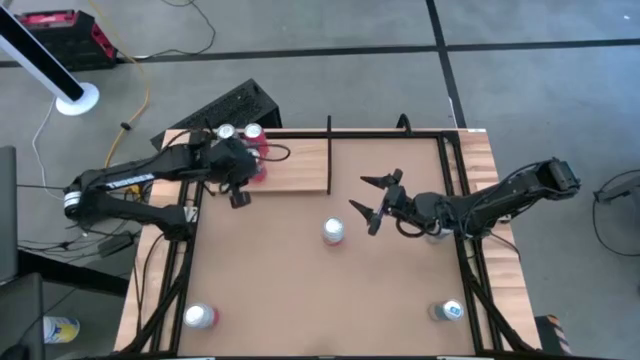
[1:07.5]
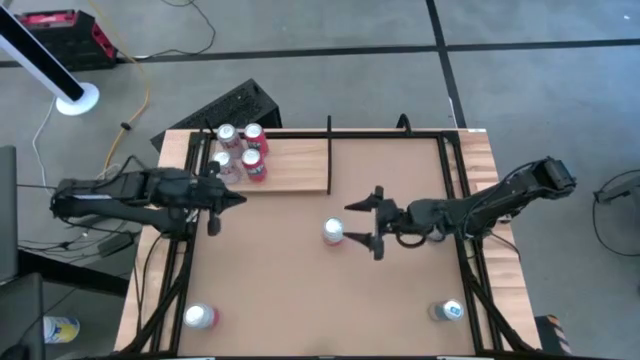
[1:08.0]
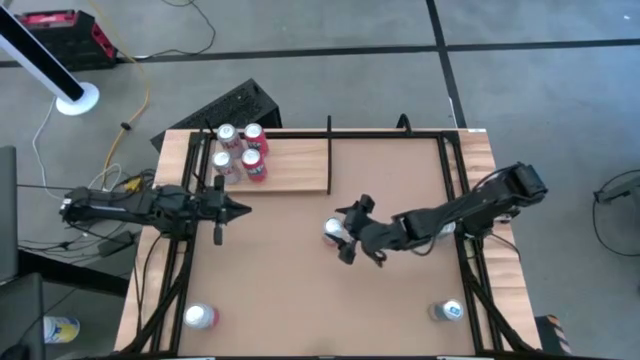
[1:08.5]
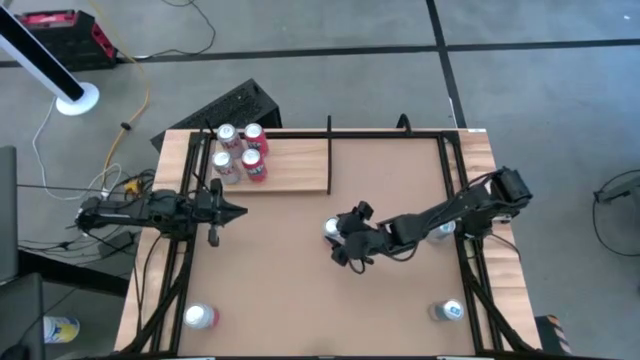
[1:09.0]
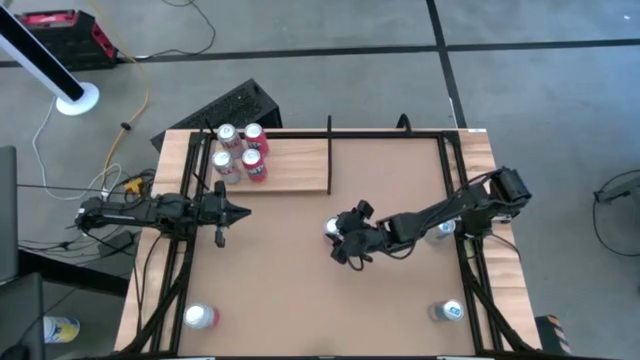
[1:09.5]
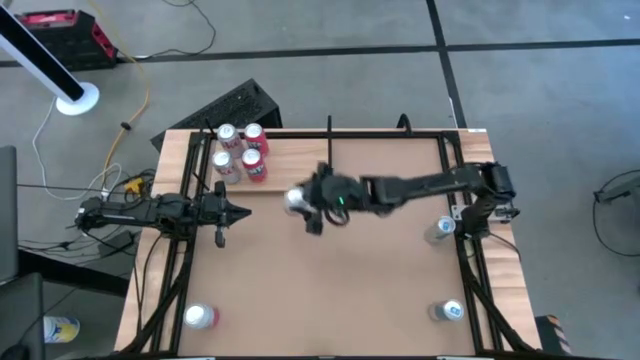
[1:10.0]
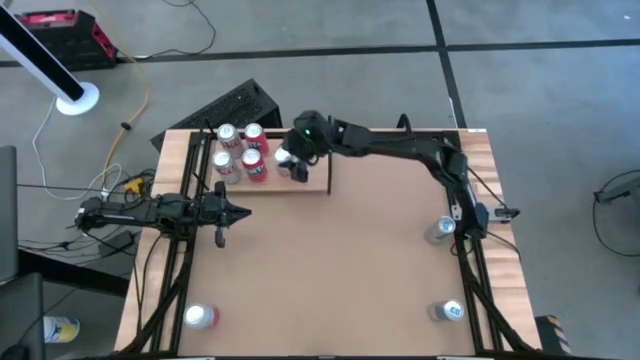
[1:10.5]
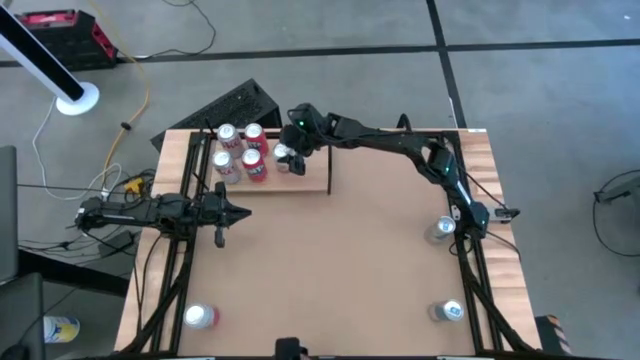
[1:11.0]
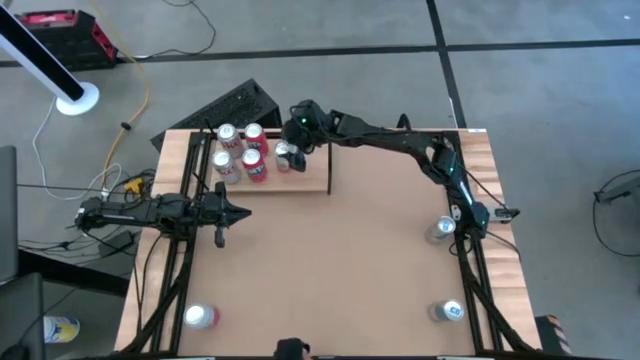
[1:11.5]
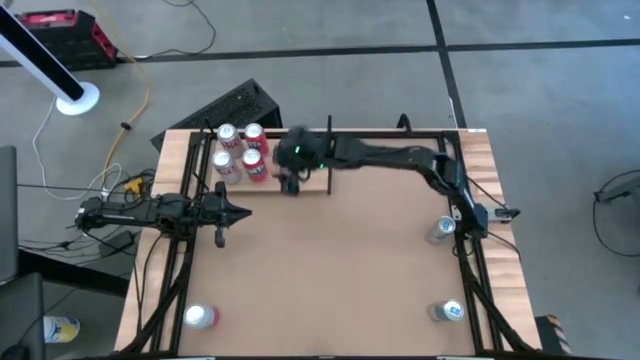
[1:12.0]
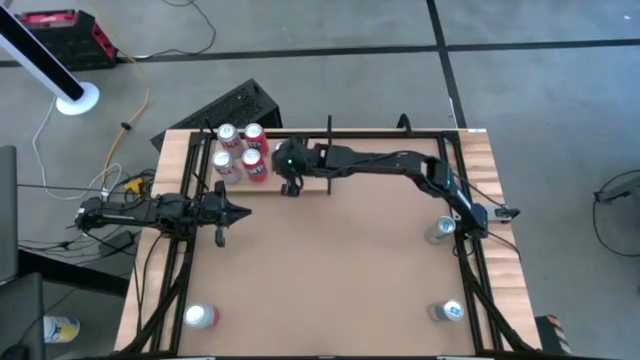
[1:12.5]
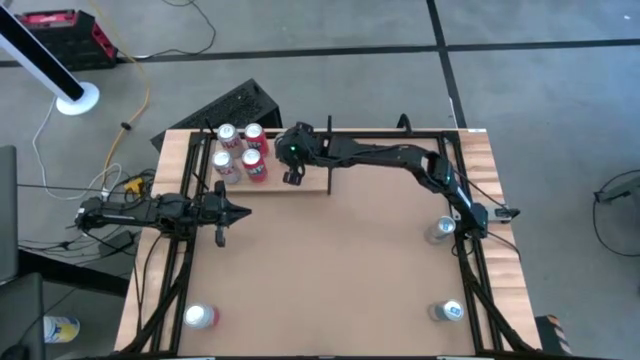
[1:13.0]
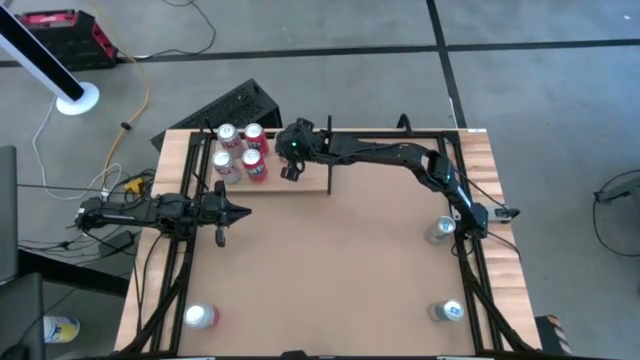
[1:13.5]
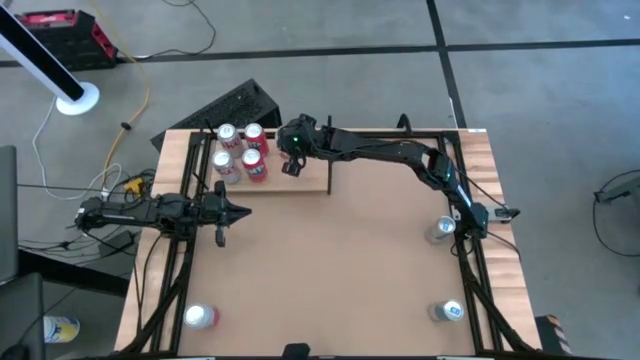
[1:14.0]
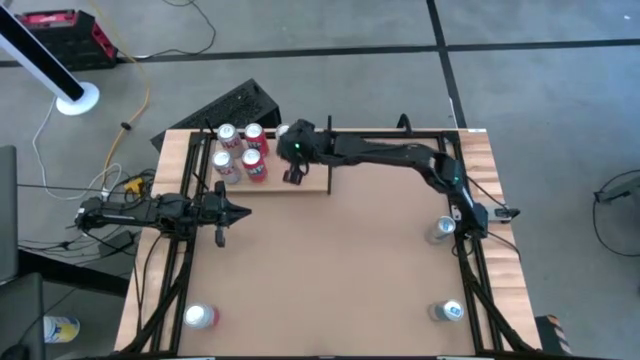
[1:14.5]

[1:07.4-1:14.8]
Task: Place canned beverage on shelf
Put the center pink and white soda can on the shelf

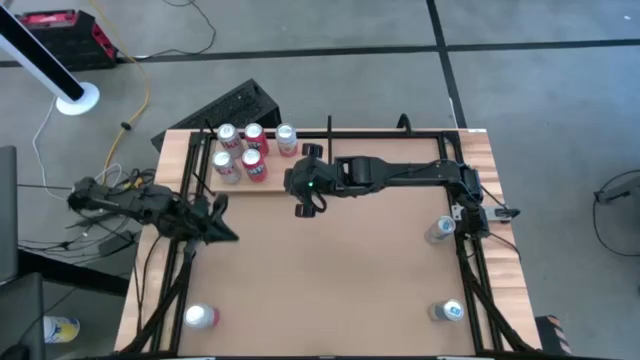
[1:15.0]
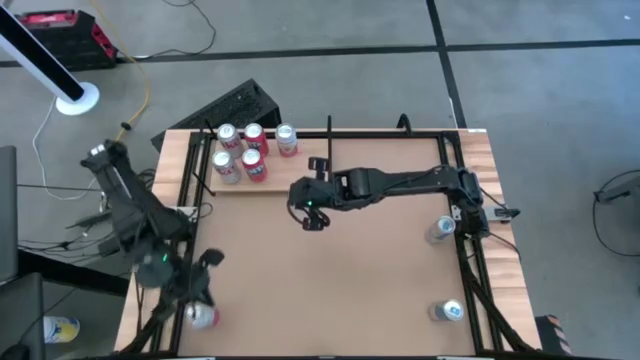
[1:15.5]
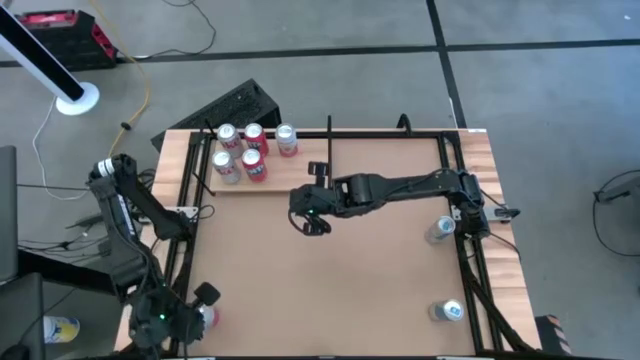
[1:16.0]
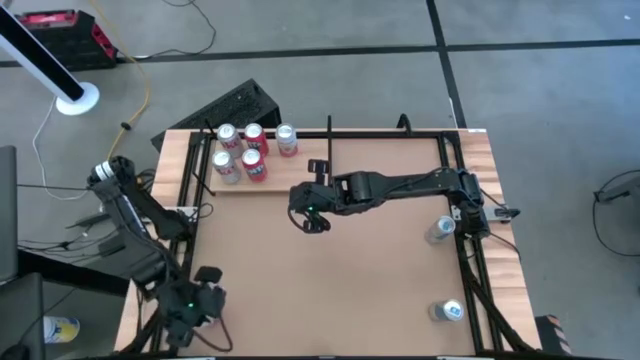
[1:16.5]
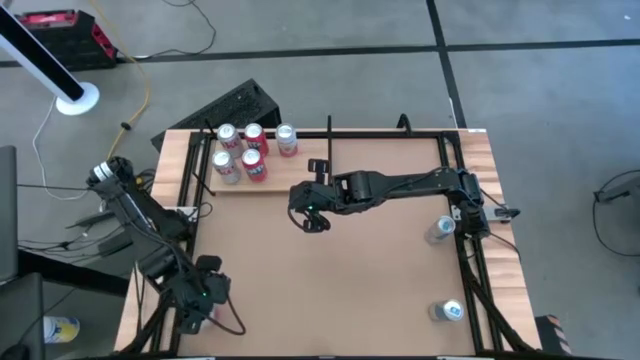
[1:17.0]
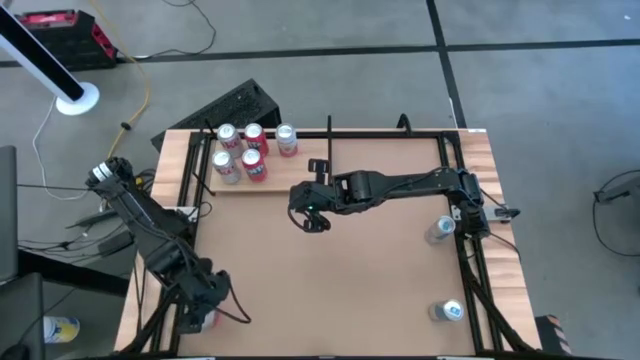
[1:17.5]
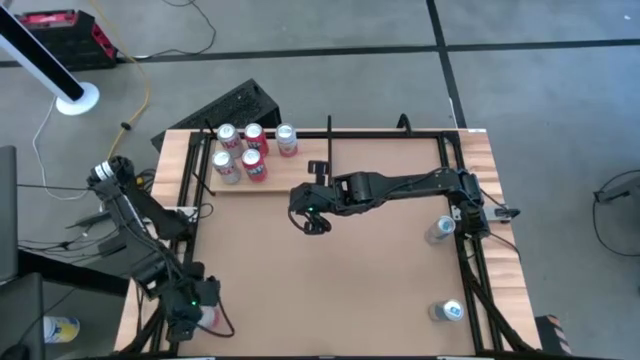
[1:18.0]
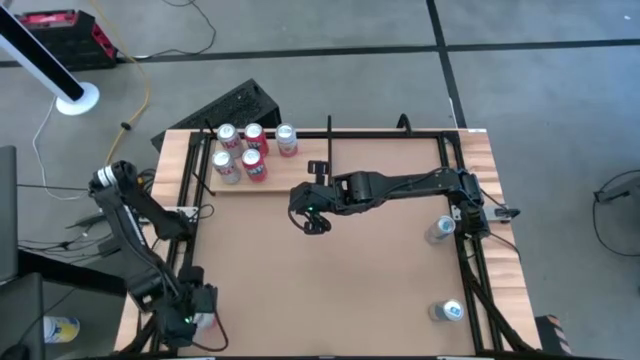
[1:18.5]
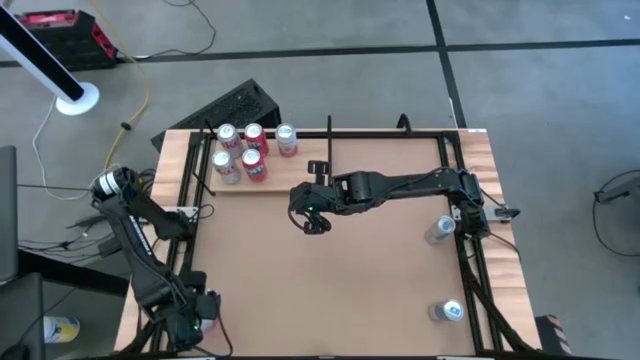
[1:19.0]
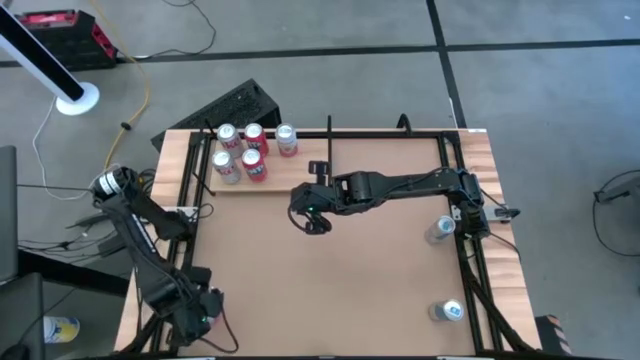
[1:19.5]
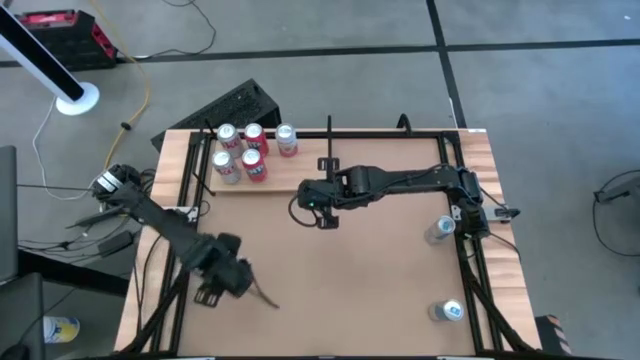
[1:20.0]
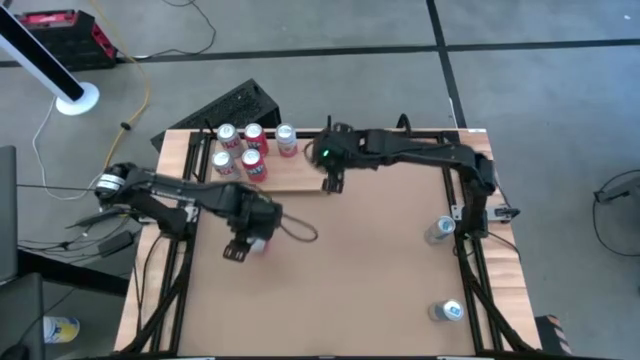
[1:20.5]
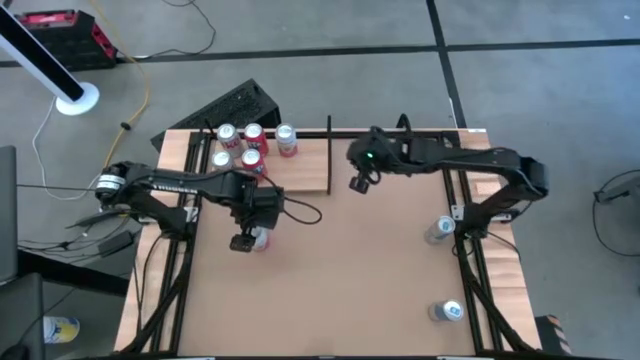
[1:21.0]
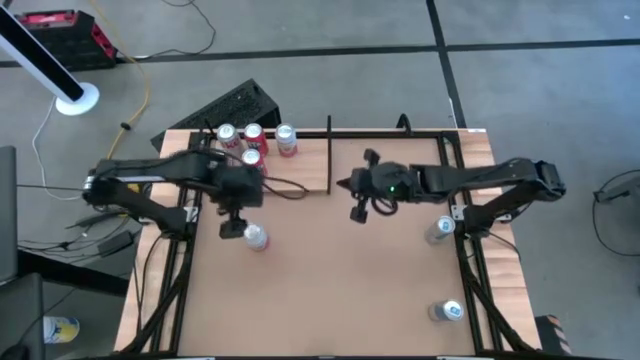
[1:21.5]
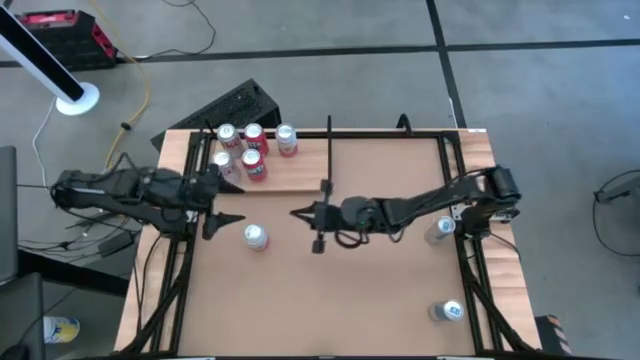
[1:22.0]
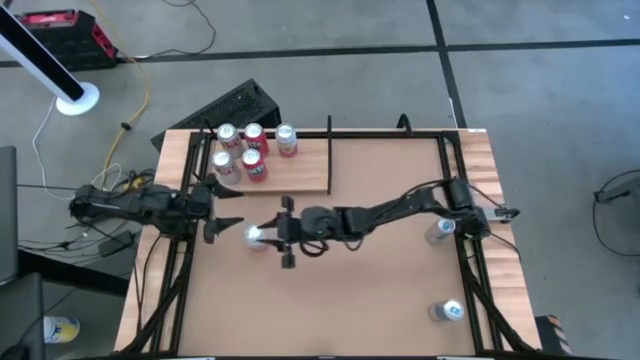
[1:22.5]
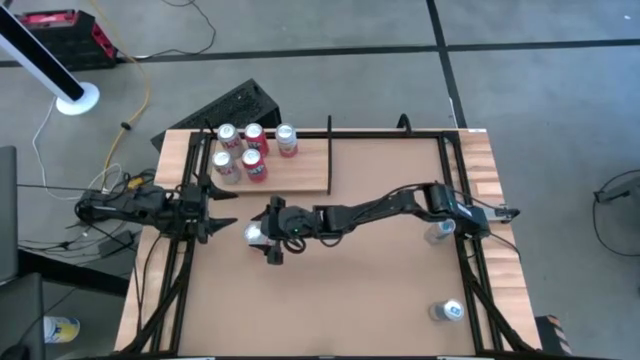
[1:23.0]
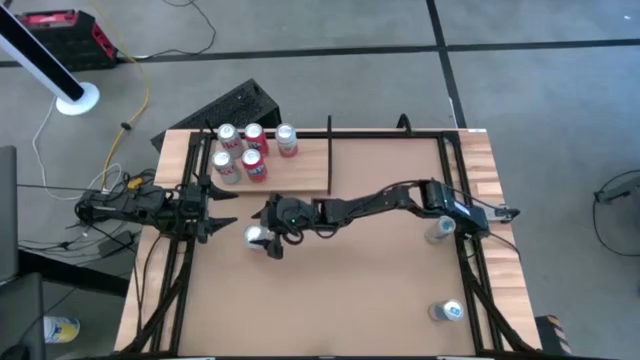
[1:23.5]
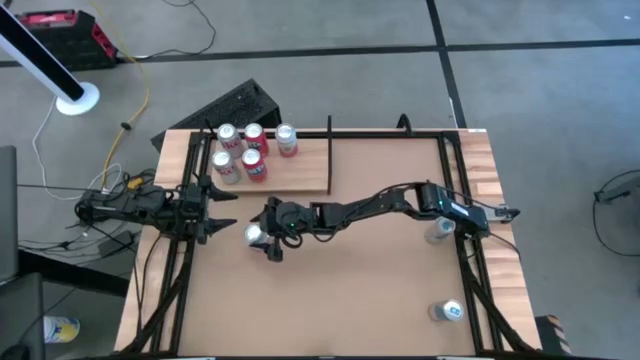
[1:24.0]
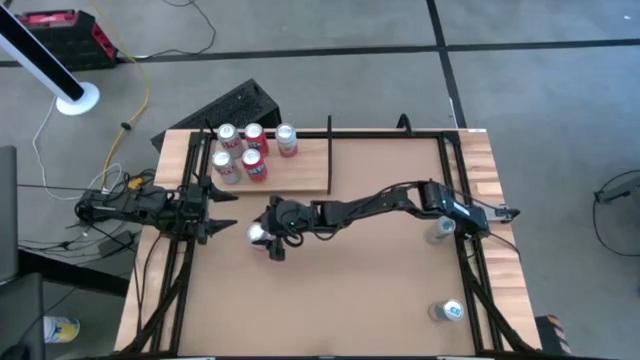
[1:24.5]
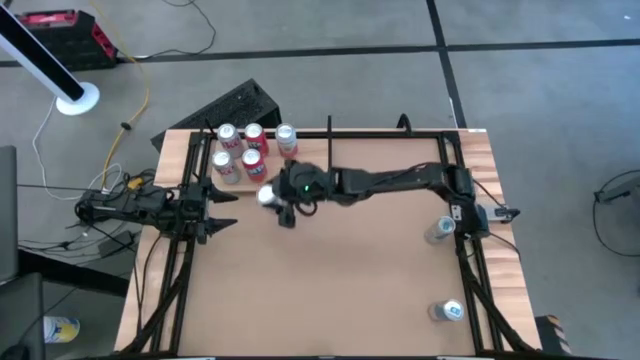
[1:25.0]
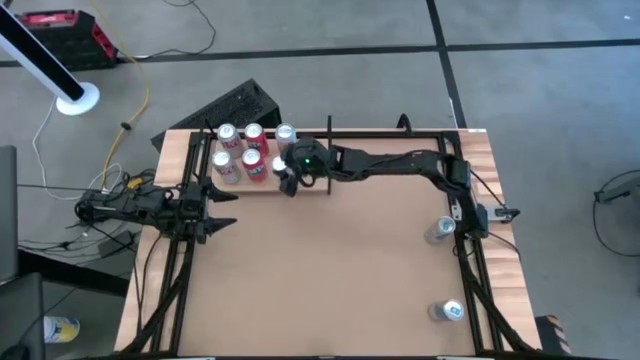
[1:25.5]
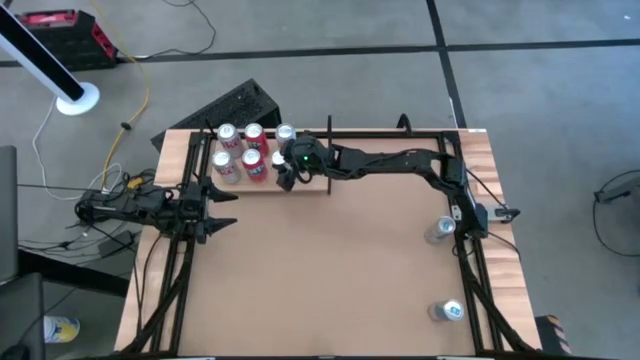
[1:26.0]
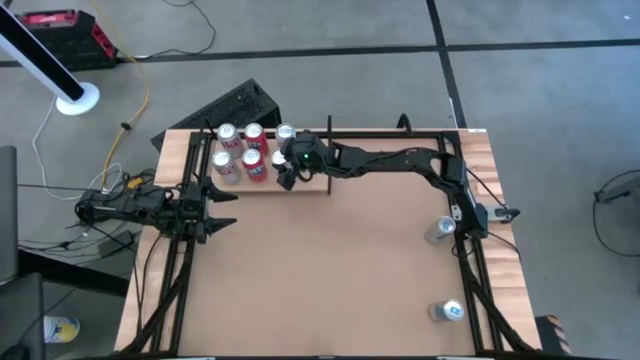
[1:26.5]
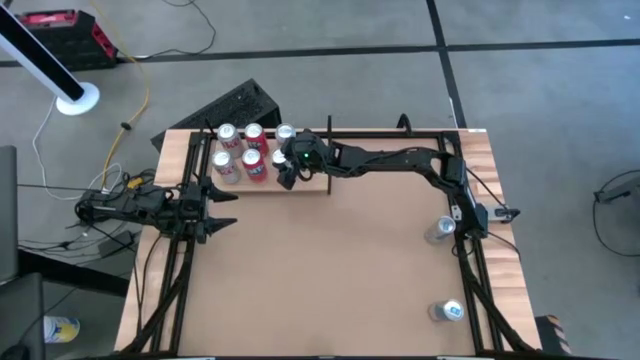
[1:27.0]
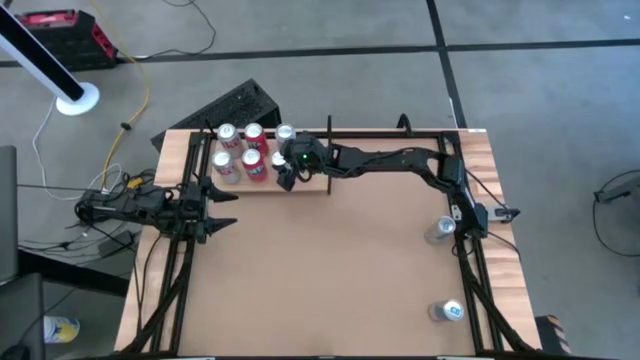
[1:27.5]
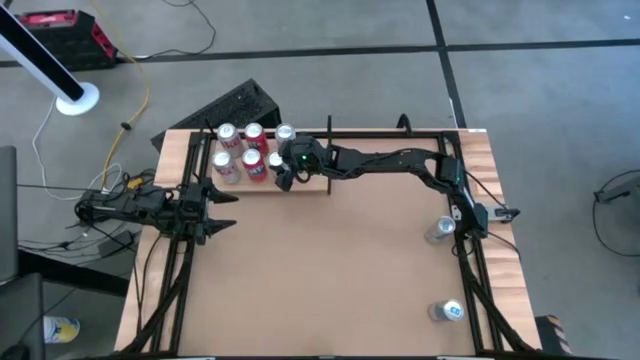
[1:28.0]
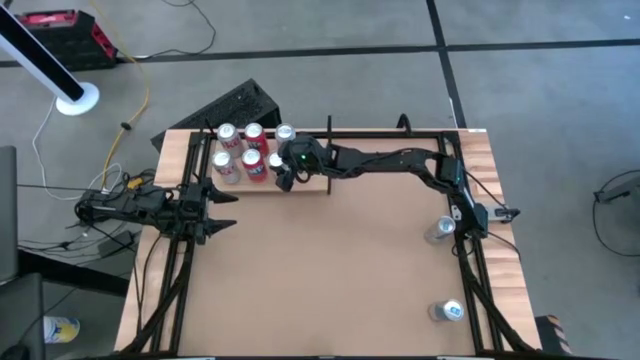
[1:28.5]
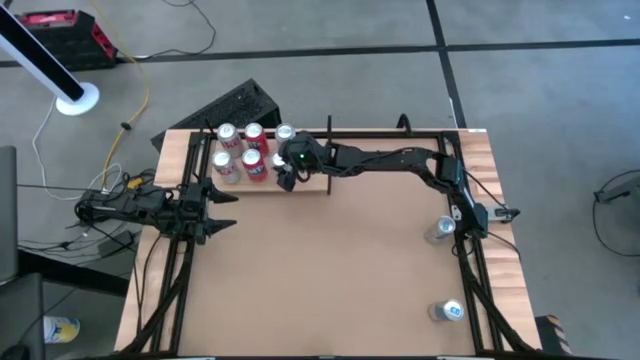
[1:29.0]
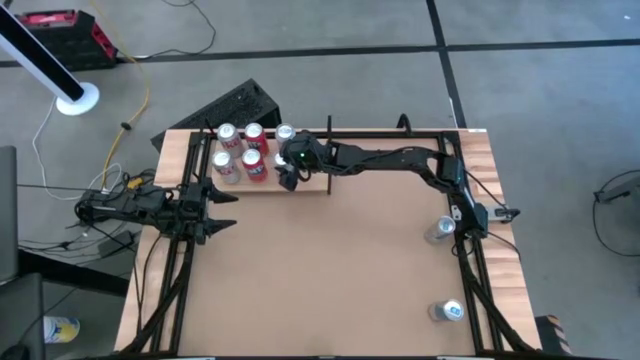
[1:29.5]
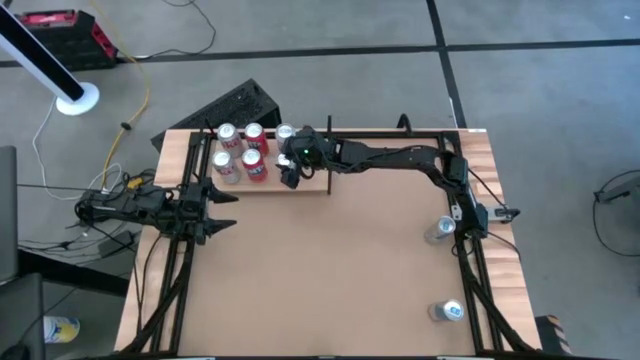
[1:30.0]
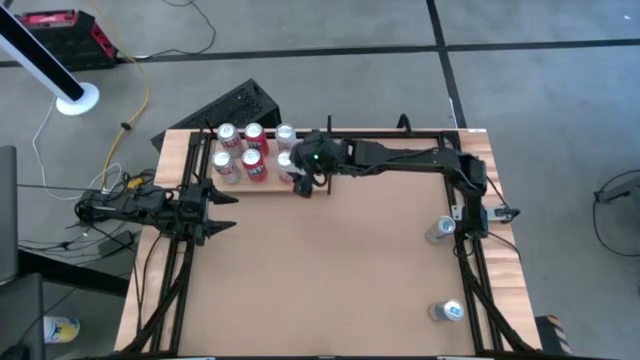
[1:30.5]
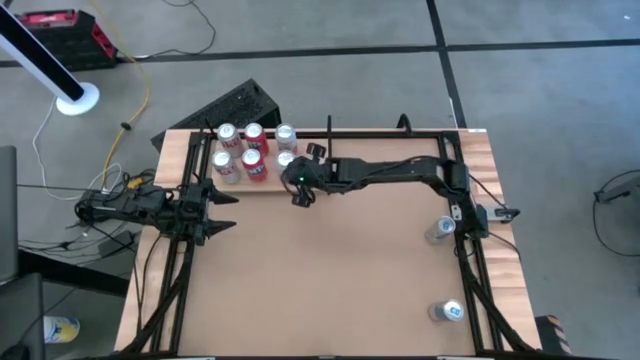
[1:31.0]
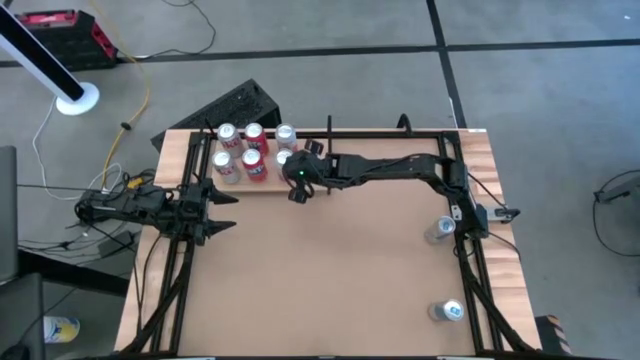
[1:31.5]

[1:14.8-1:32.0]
Put the pink and white soda can on the shelf aligned with the other pink and white soda can
